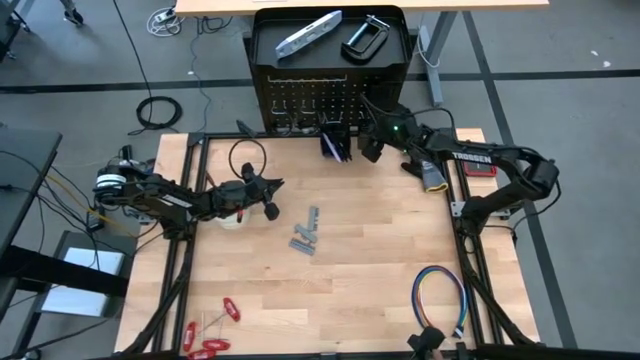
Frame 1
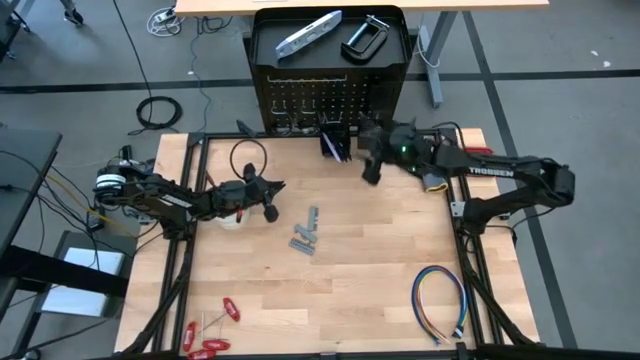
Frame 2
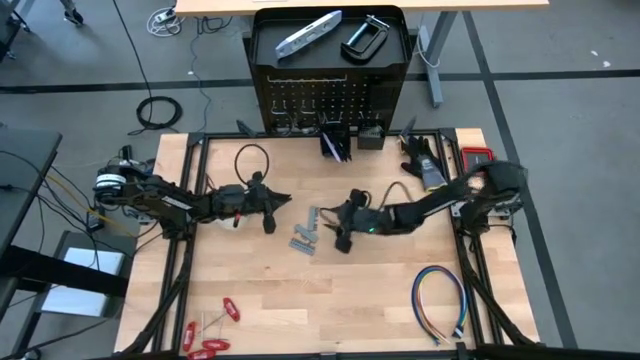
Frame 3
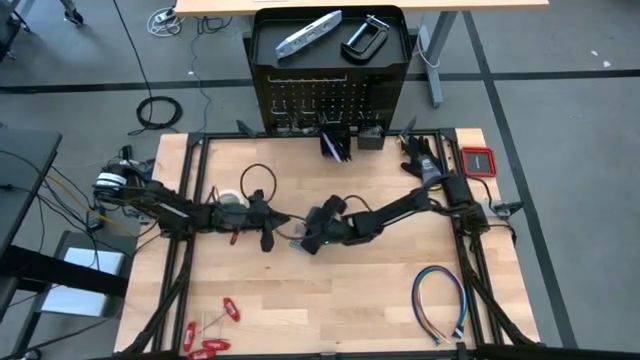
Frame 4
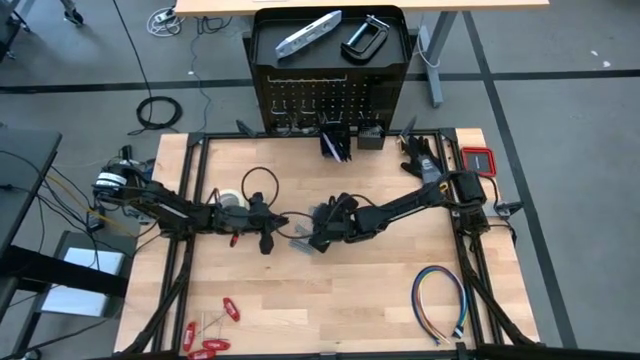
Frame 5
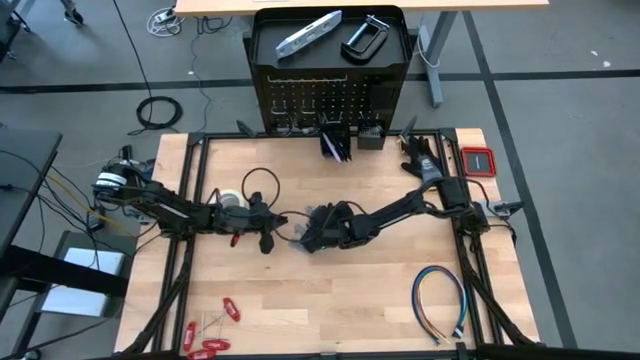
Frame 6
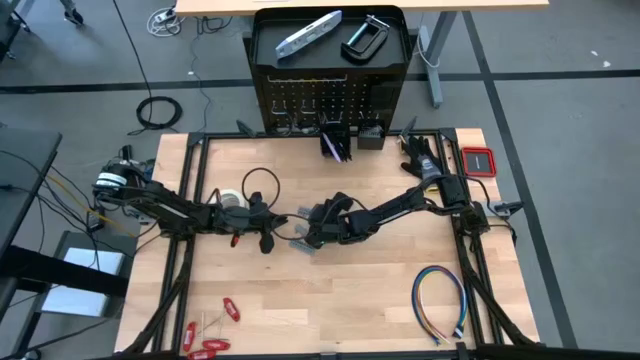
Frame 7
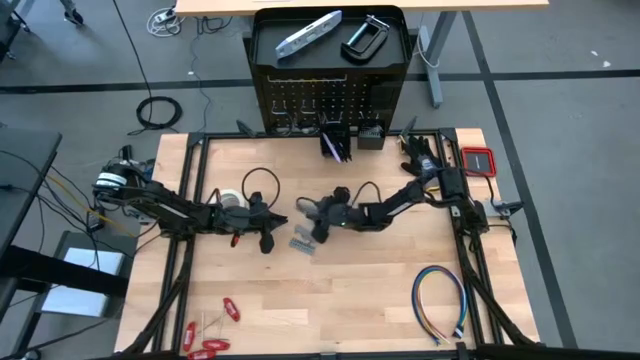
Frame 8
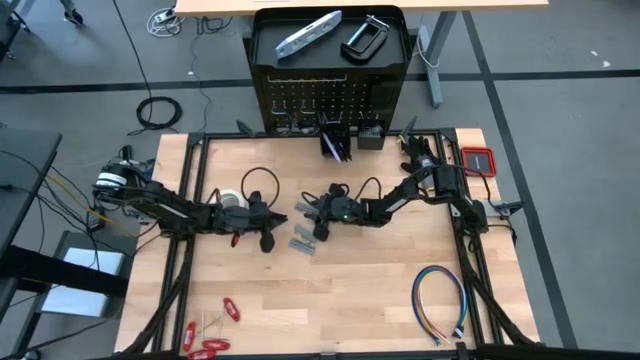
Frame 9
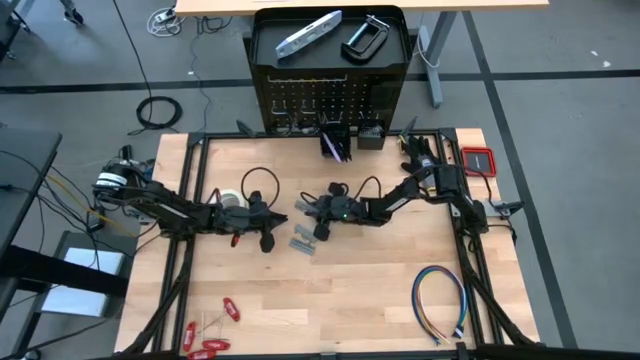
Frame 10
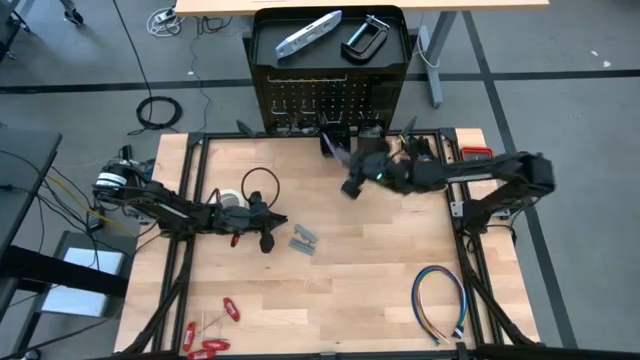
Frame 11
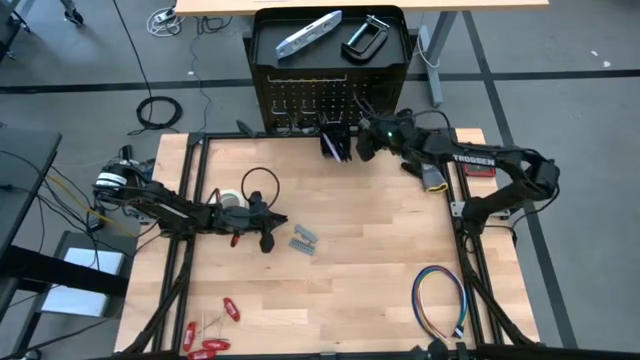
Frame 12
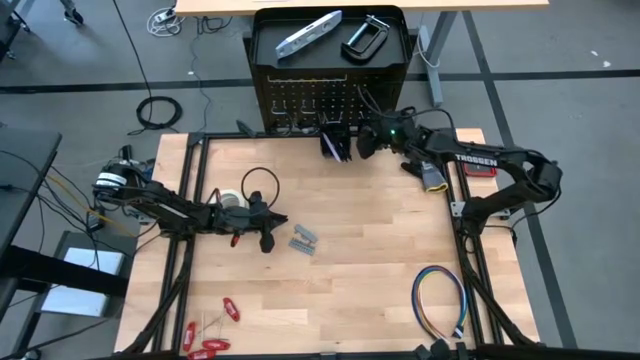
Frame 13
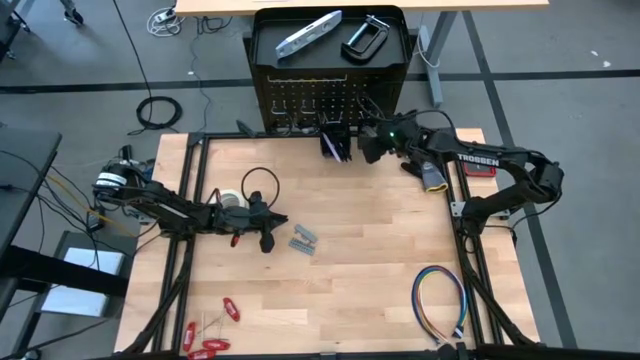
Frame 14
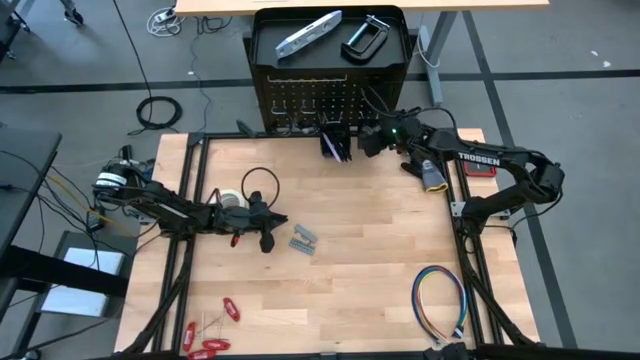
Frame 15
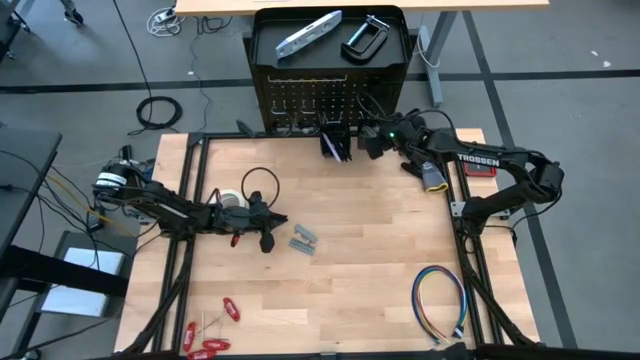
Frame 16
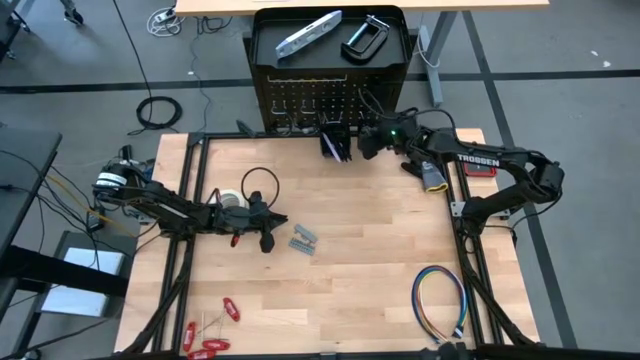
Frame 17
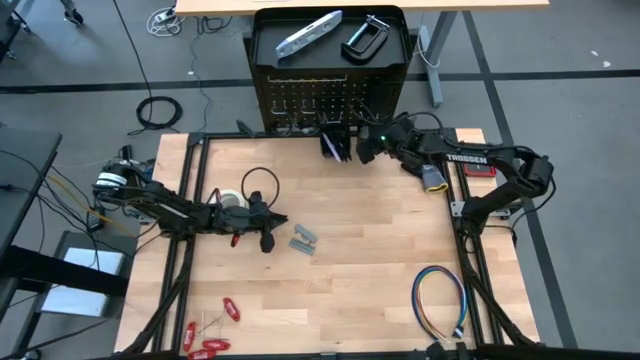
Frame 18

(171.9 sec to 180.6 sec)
Task: Hang tools onto peg board
Put the gray screwdriver bit set into the right black bin on the peg board

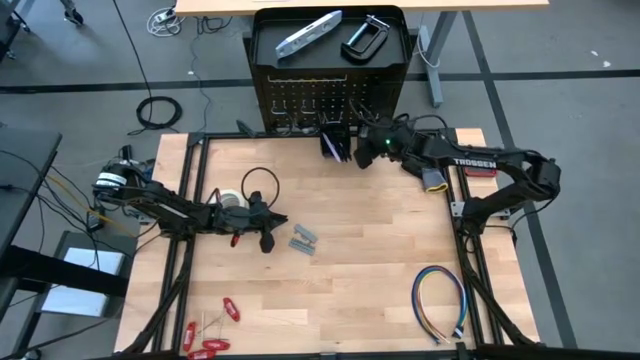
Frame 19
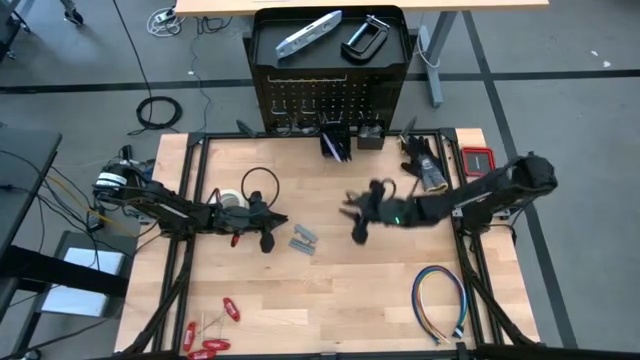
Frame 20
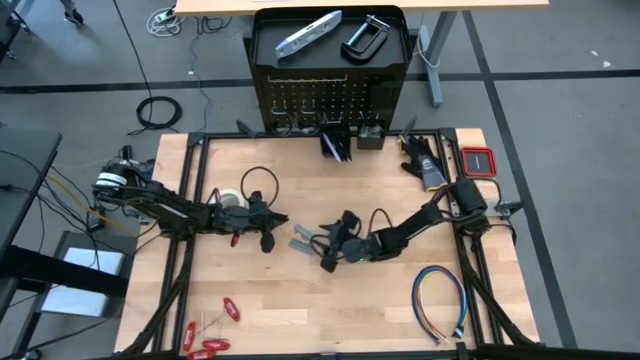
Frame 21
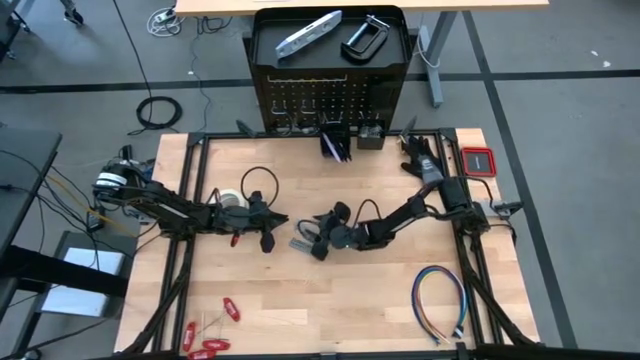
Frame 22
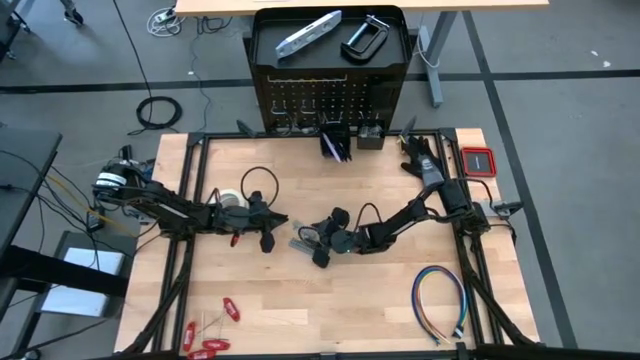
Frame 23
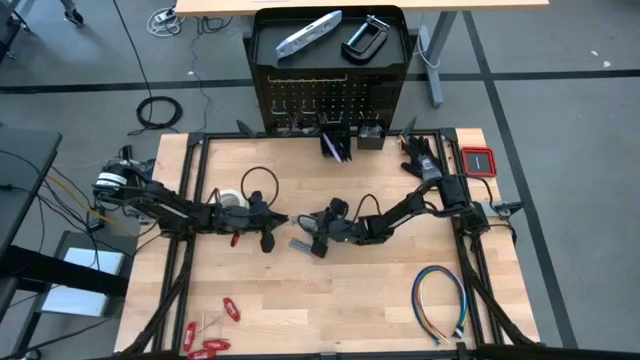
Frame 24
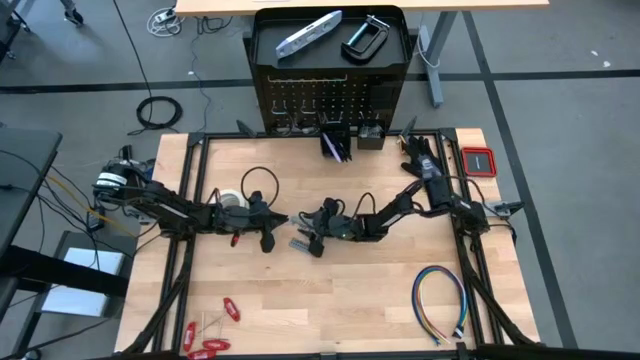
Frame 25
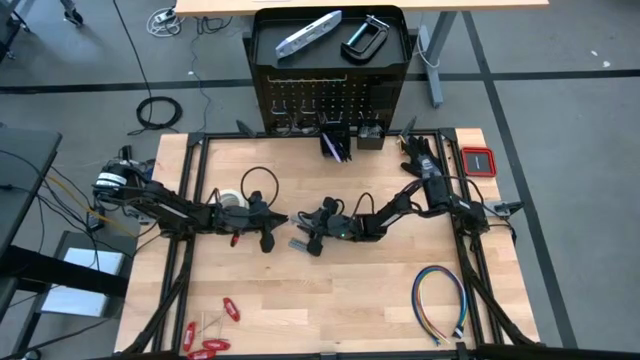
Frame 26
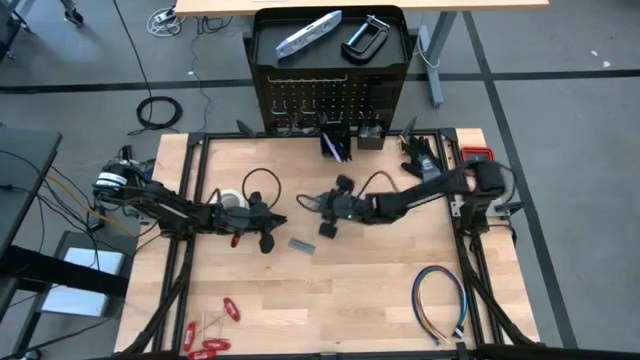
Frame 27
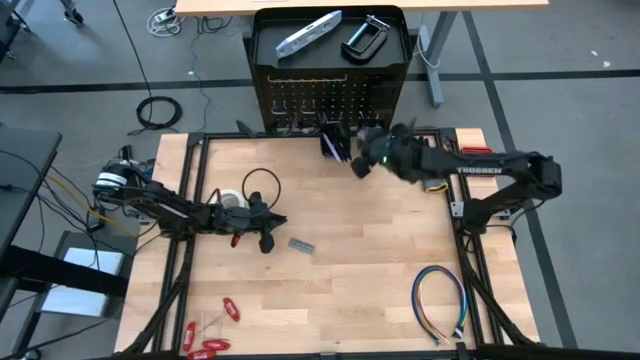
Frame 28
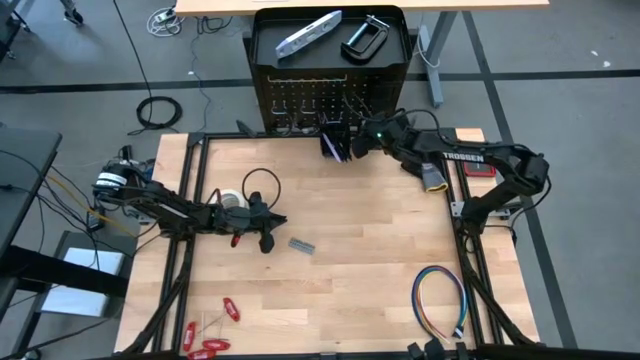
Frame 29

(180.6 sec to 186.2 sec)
Put the gray screwdriver bit set into the right black bin on the peg board

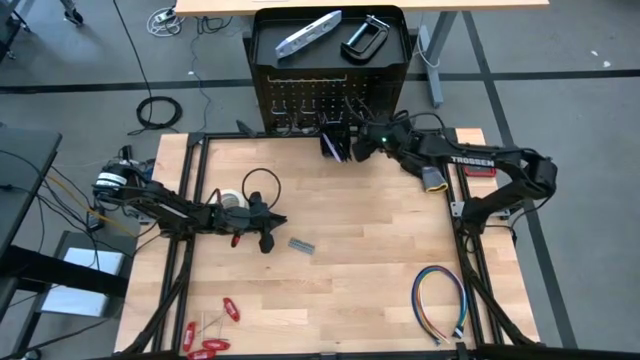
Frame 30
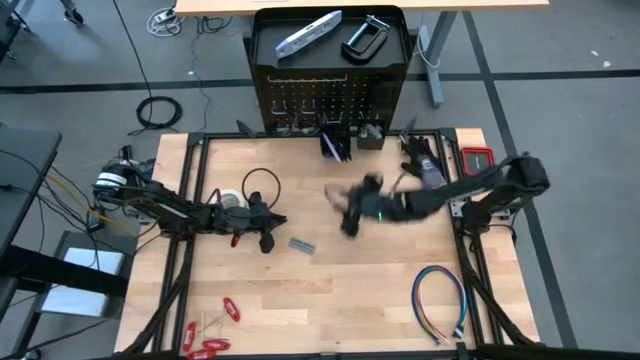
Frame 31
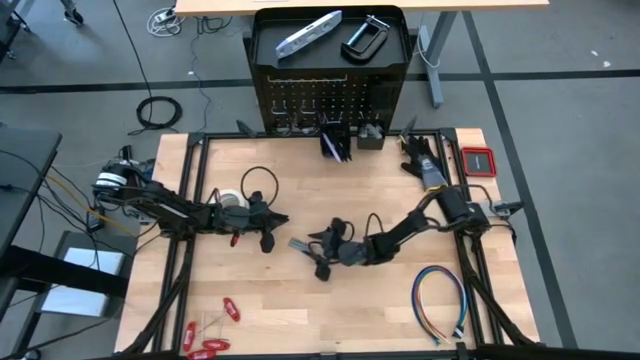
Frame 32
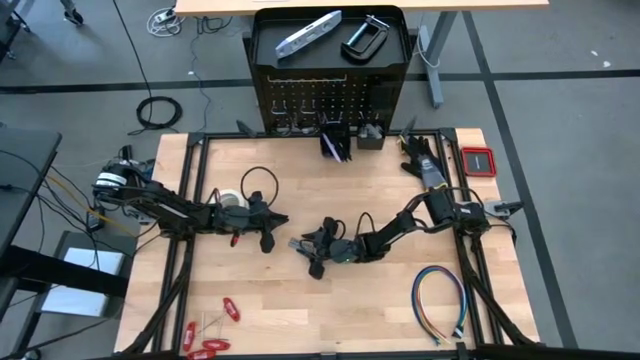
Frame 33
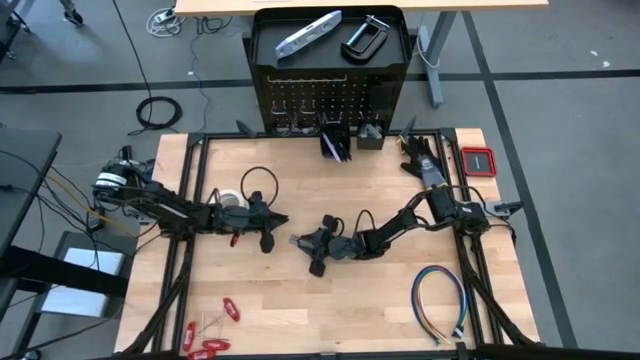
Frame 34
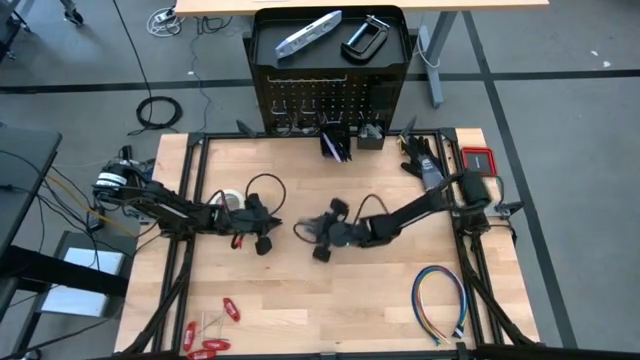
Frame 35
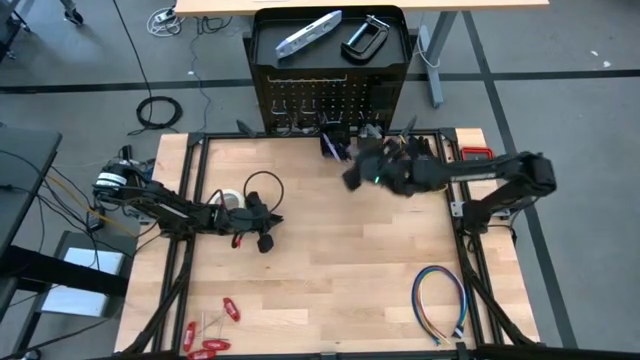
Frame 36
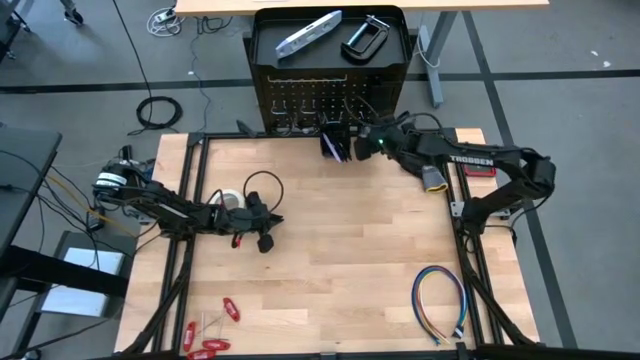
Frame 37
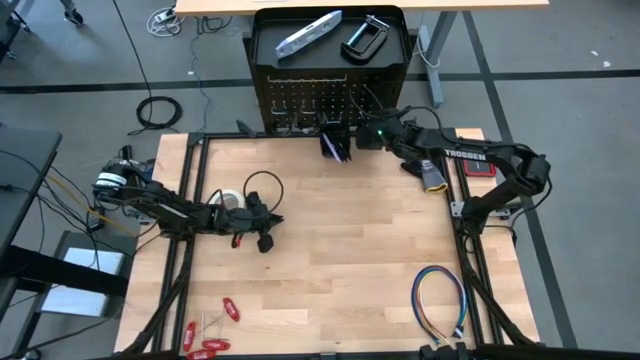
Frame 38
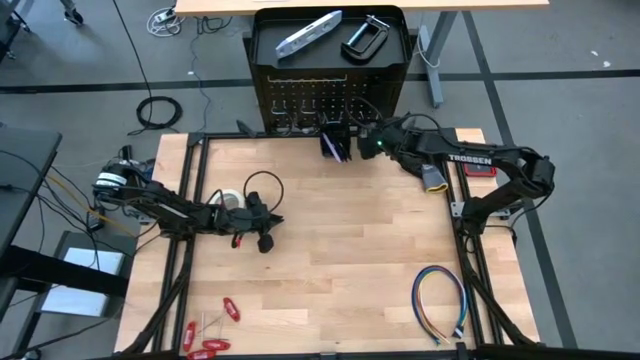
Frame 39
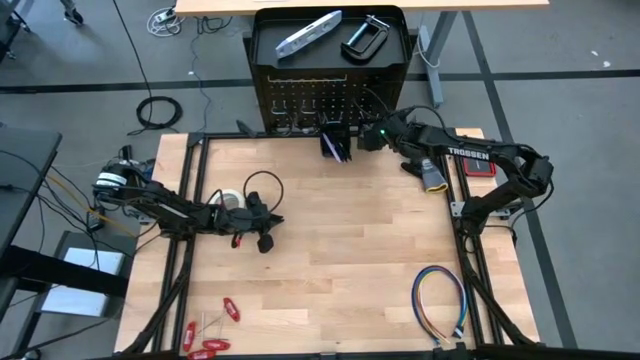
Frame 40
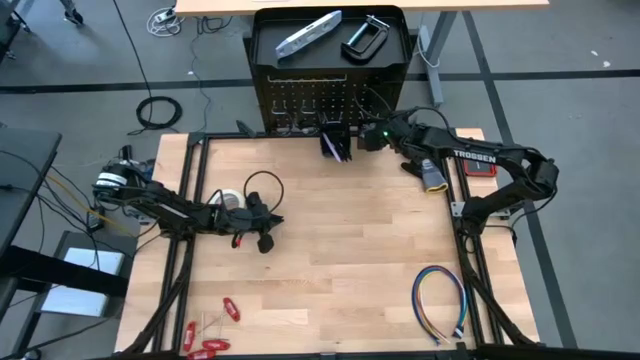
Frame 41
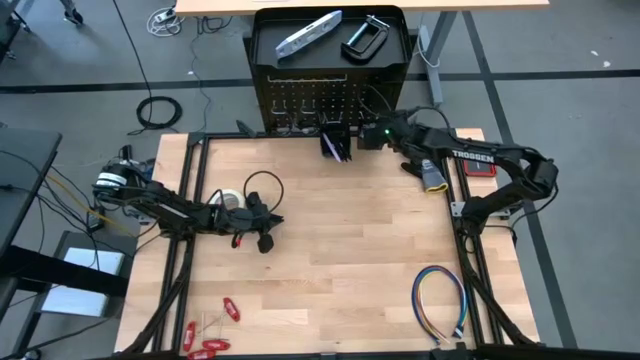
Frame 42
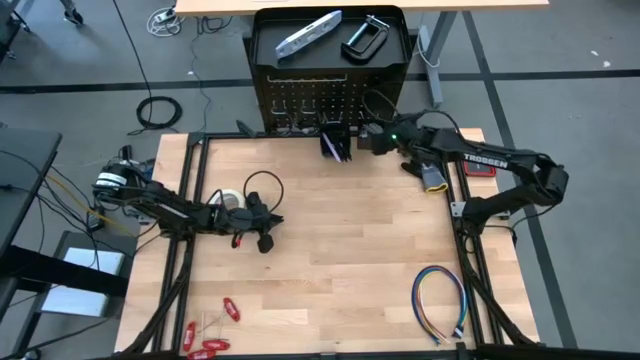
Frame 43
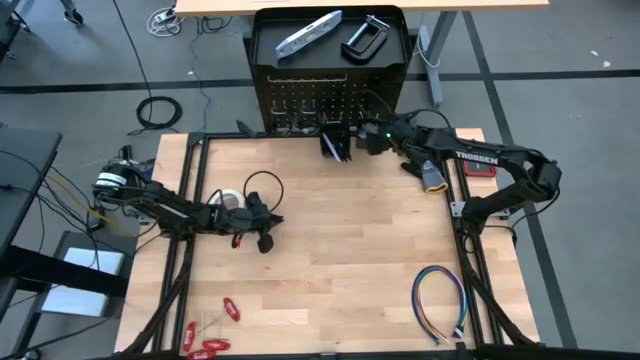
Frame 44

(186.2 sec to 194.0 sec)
Put the gray screwdriver bit set into the right black bin on the peg board

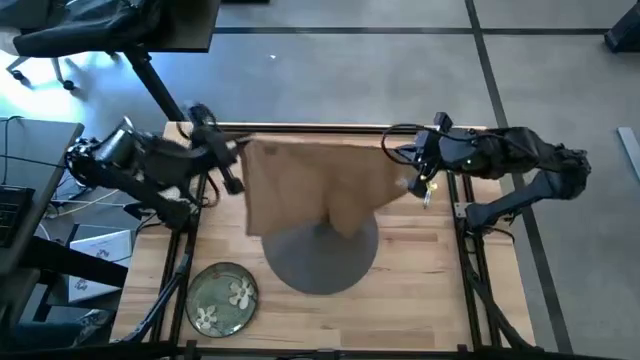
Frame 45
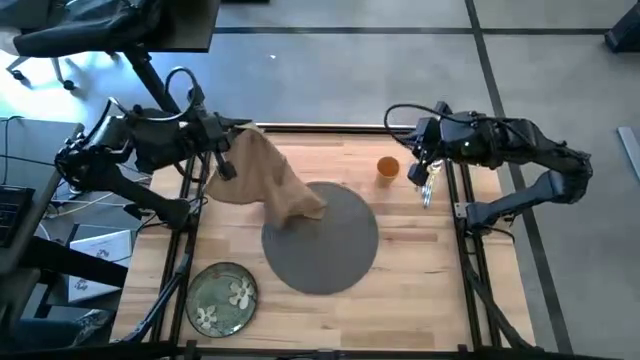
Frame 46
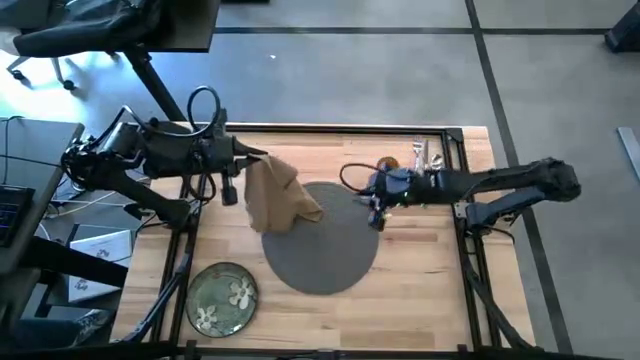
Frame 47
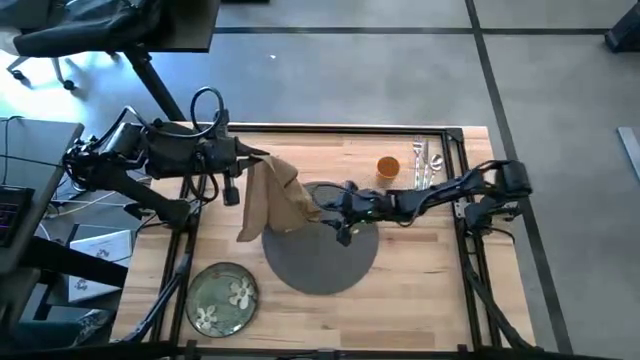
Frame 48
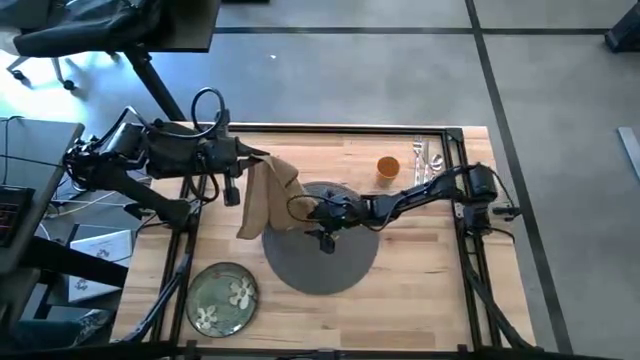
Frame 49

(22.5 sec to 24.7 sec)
Task: Set table place
Fold the brown napkin
